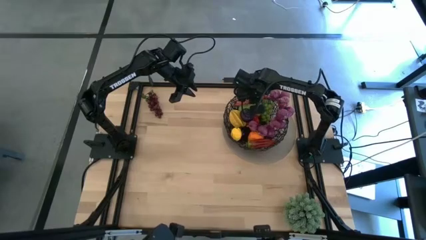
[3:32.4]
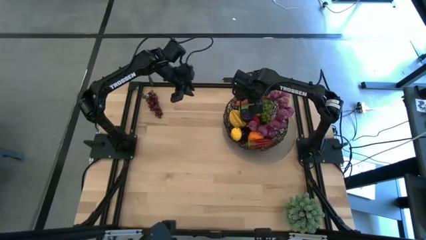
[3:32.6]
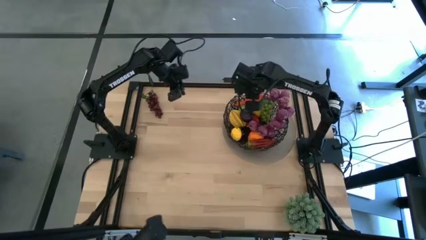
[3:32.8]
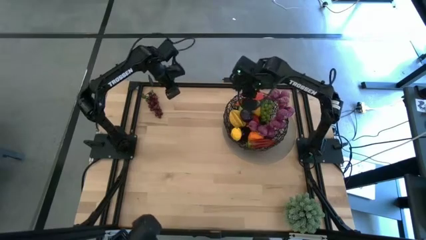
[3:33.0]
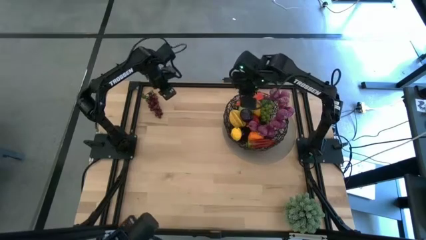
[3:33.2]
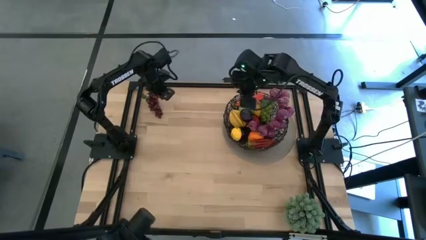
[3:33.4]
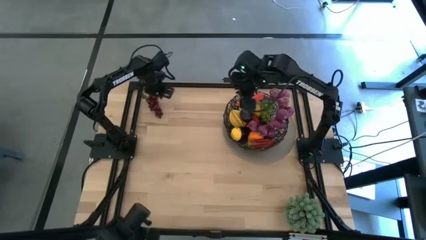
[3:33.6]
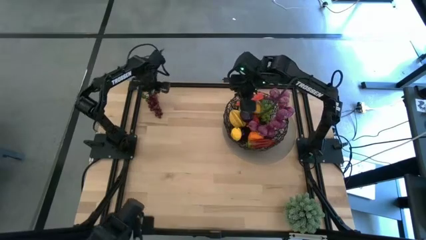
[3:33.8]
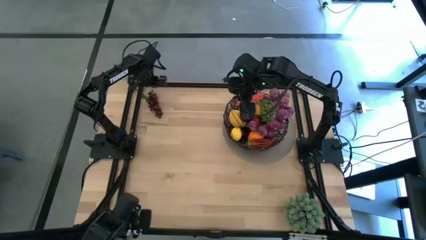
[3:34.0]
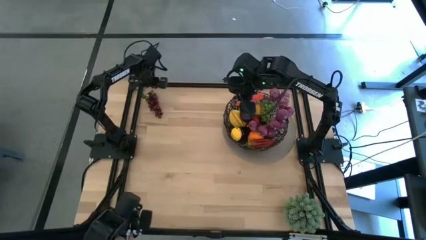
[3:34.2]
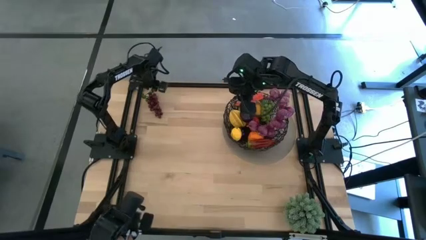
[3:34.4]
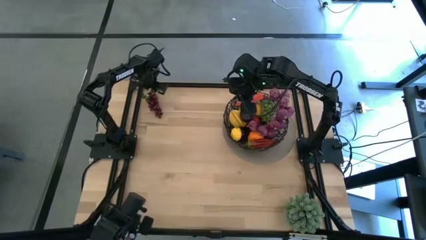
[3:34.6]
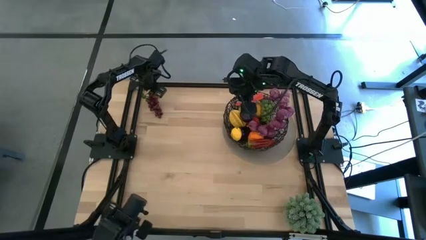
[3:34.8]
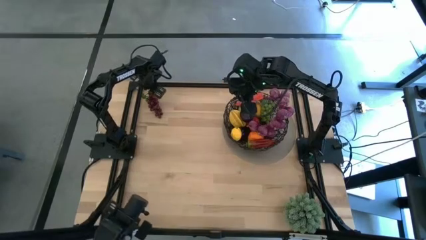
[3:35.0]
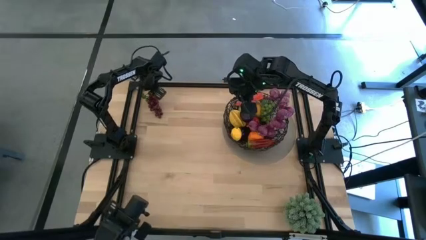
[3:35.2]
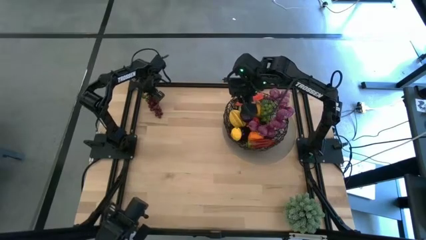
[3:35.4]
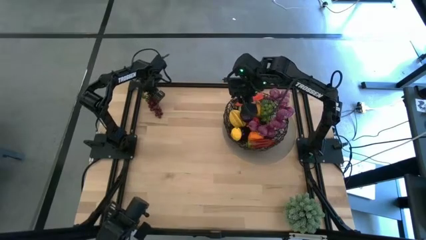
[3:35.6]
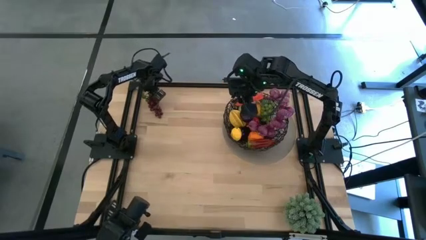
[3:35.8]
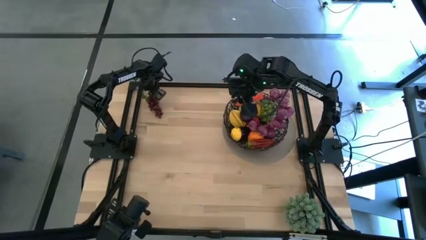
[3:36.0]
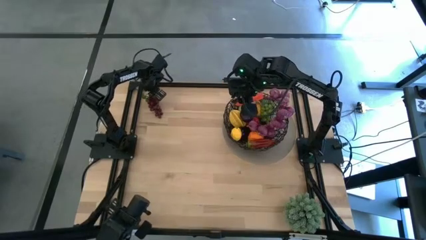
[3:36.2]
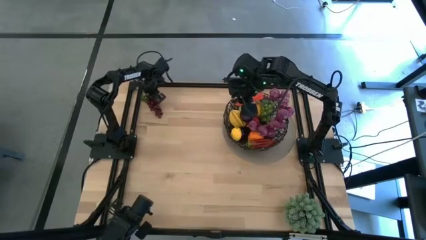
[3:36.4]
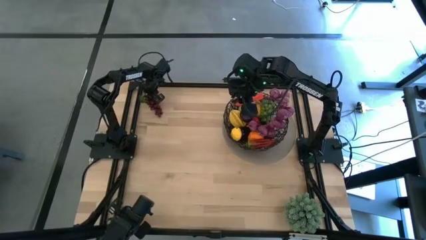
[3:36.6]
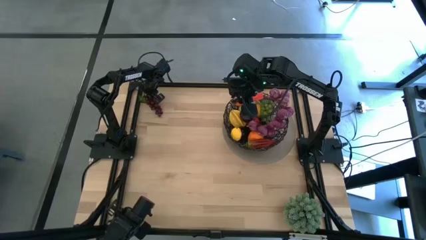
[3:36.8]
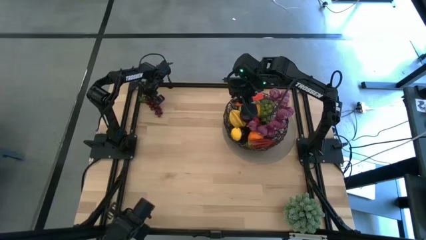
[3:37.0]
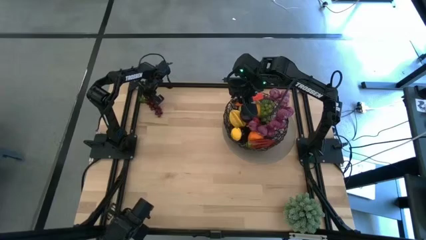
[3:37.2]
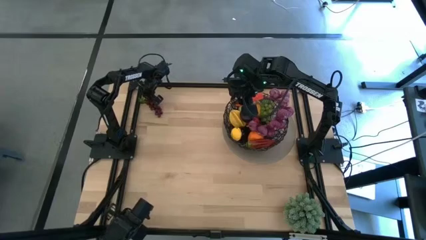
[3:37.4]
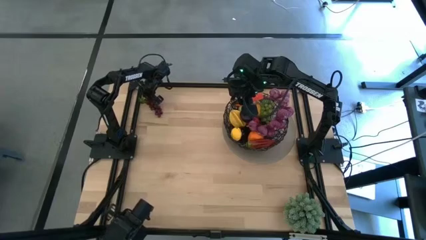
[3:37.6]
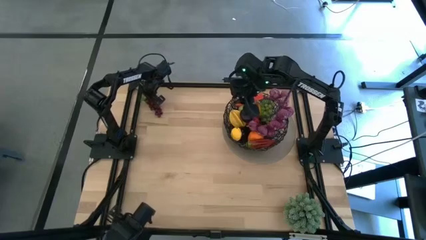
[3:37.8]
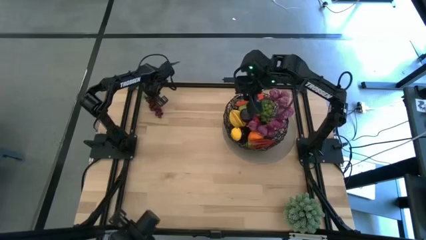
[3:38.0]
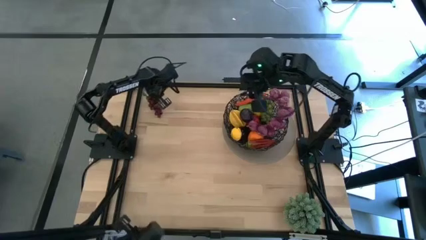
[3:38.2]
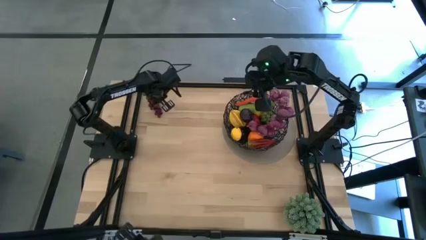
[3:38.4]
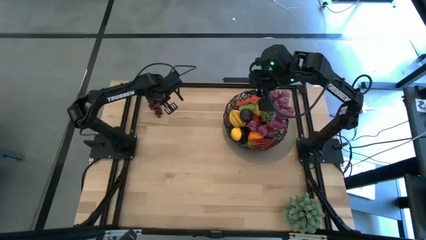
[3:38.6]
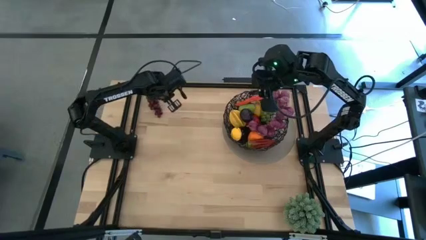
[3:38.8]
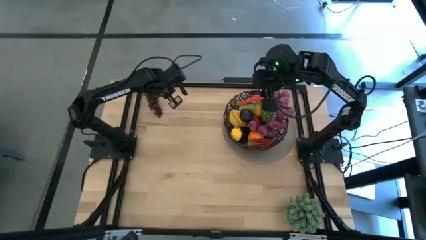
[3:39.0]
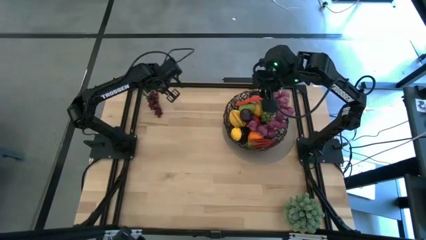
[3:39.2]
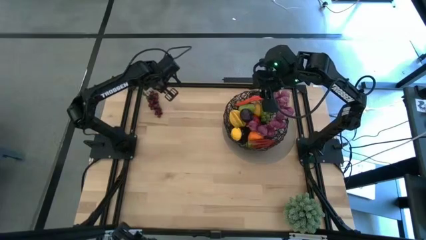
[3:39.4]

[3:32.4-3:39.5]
Task: Build produce basket
Put the purple grapes into the black wire basket

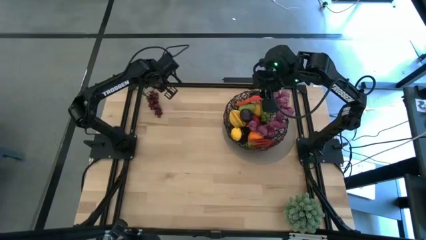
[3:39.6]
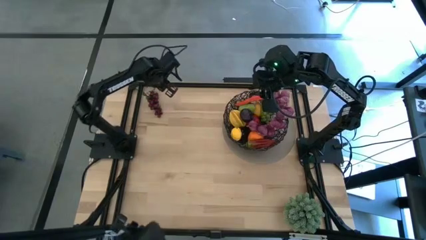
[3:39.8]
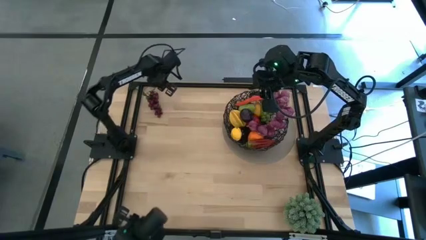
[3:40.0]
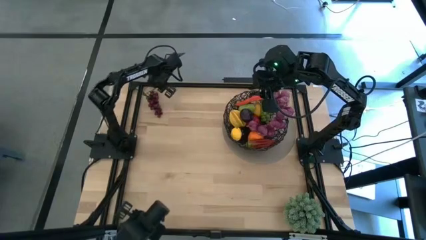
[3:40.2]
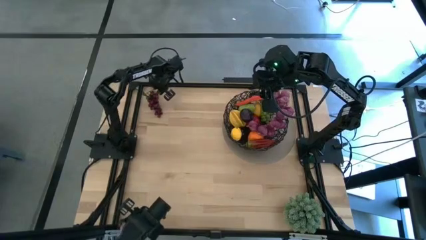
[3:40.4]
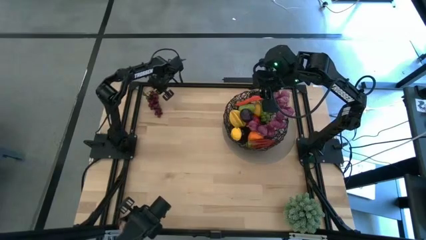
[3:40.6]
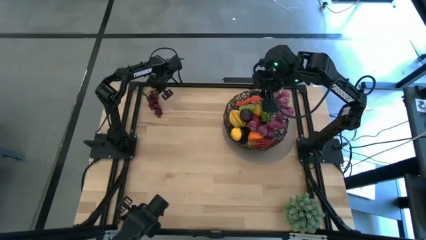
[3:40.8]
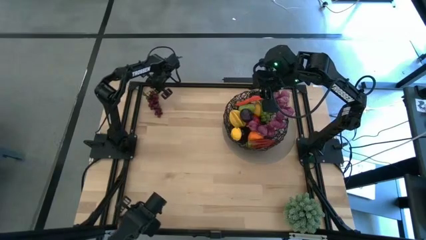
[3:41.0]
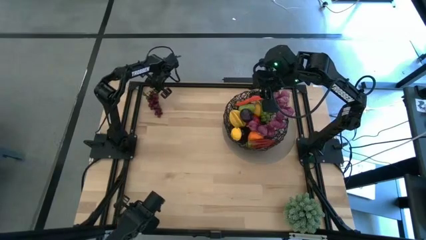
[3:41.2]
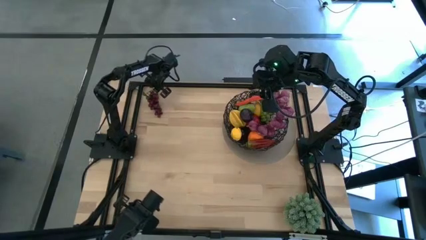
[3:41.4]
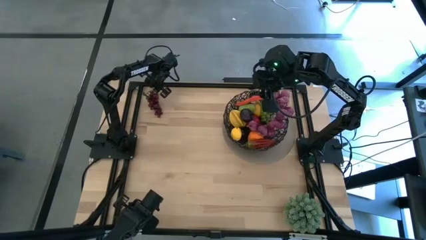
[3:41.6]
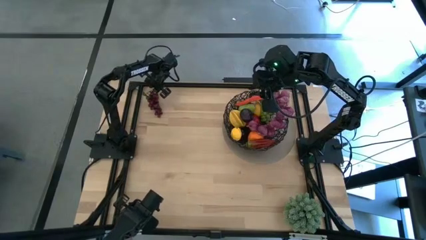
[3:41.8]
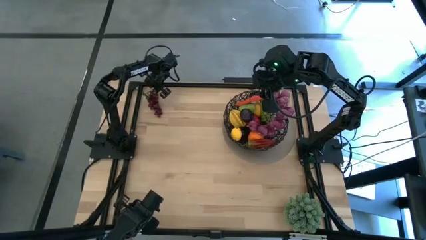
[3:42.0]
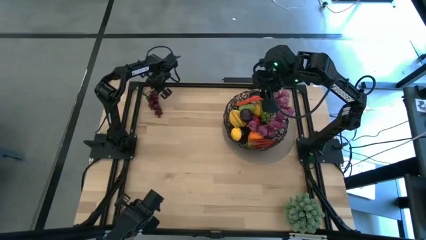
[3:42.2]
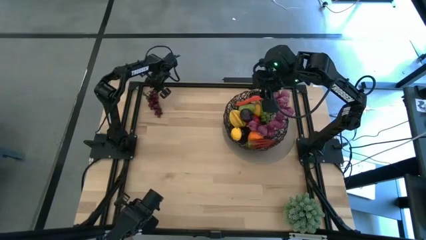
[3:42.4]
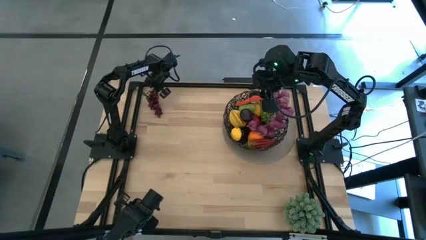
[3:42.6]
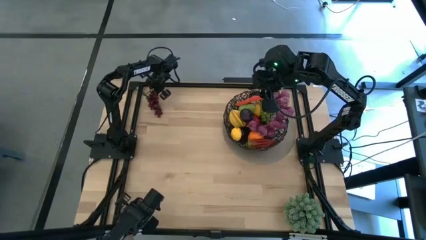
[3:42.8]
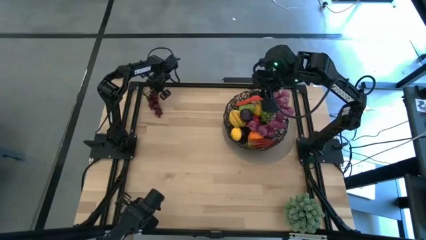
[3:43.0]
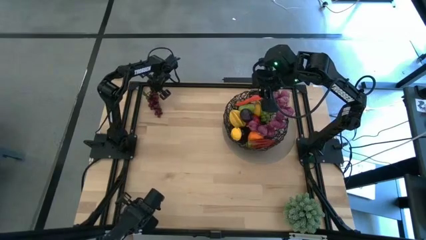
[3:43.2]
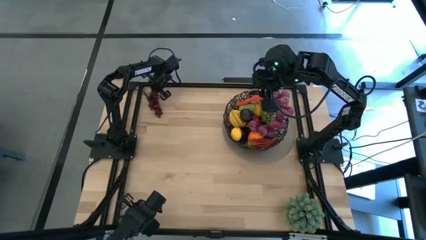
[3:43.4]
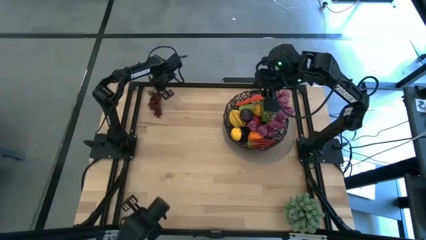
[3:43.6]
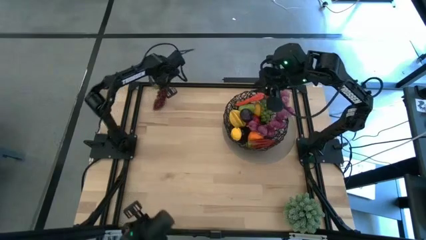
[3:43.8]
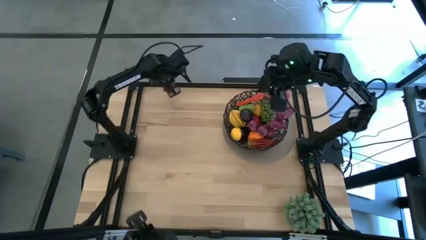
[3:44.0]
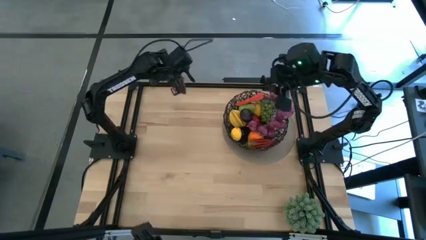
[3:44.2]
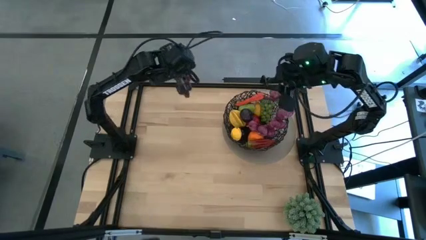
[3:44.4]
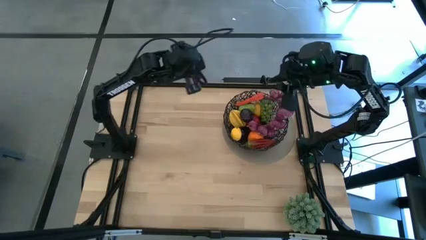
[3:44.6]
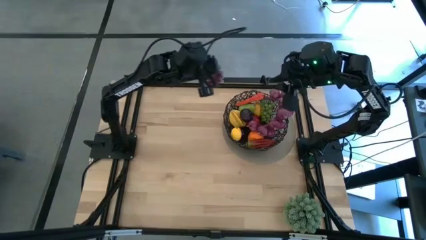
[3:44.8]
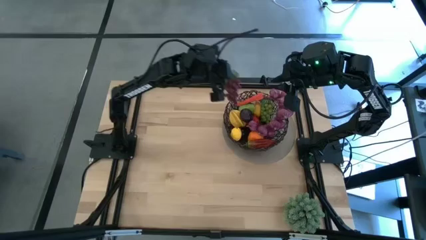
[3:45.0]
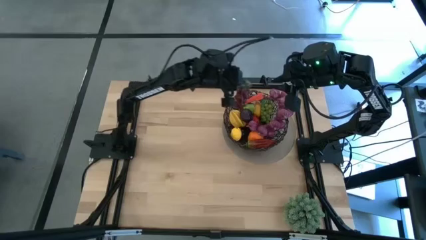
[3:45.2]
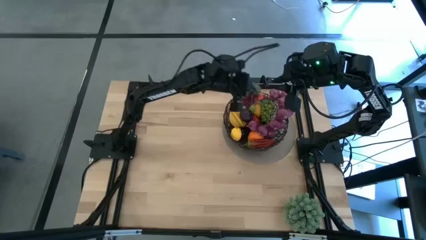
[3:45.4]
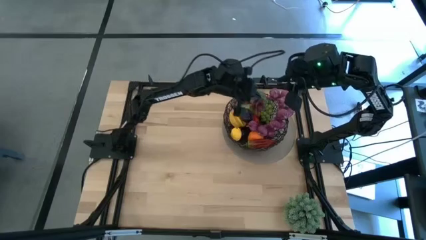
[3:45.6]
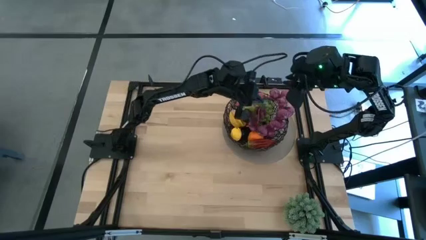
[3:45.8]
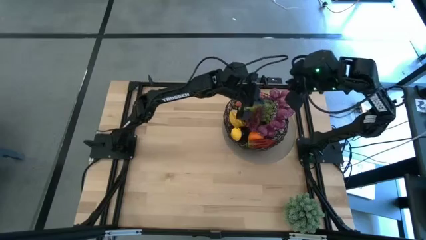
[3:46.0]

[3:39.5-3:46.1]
Put the purple grapes into the black wire basket

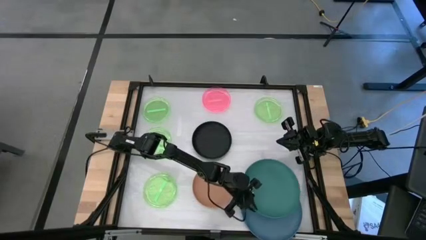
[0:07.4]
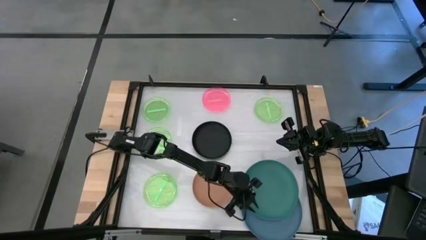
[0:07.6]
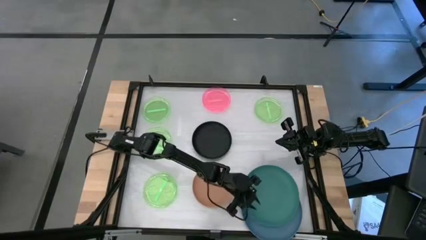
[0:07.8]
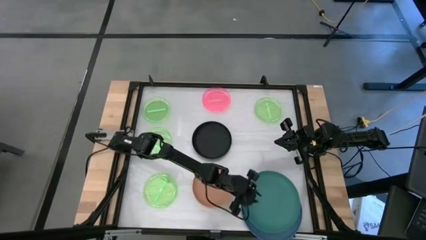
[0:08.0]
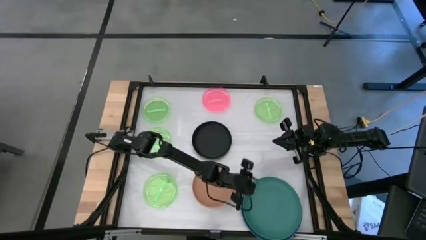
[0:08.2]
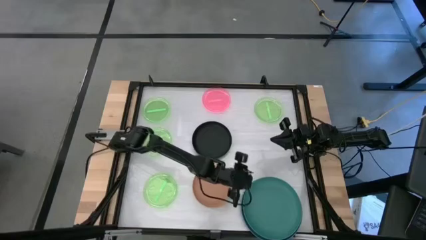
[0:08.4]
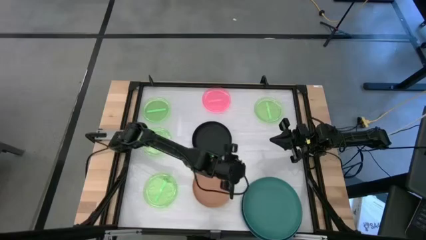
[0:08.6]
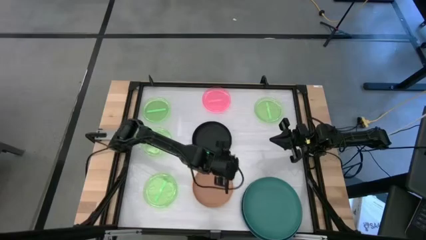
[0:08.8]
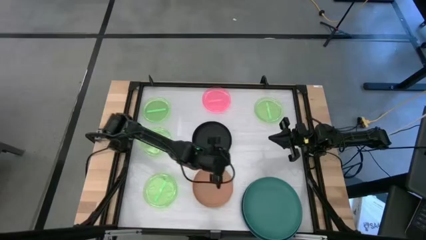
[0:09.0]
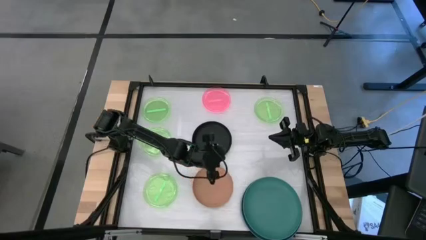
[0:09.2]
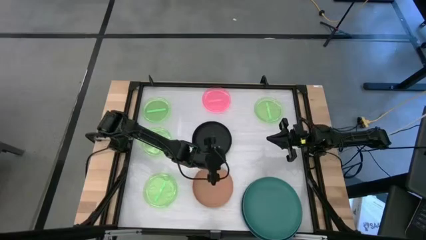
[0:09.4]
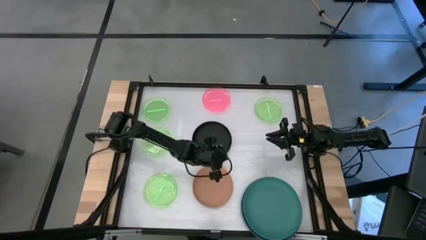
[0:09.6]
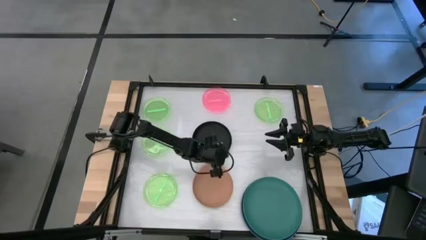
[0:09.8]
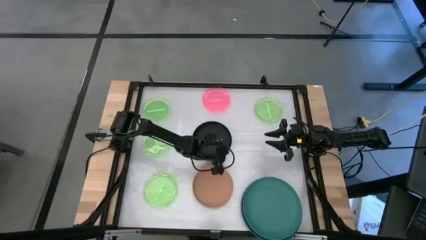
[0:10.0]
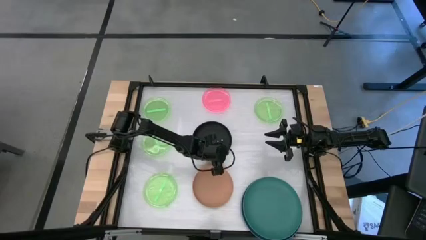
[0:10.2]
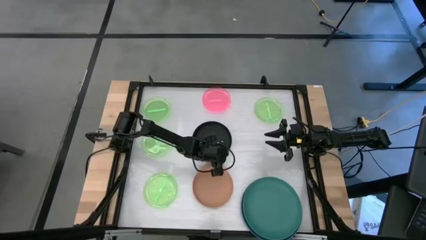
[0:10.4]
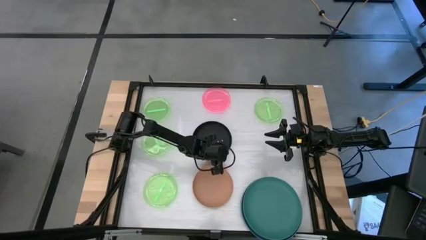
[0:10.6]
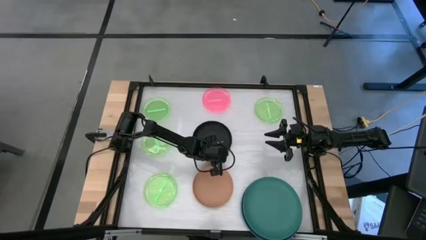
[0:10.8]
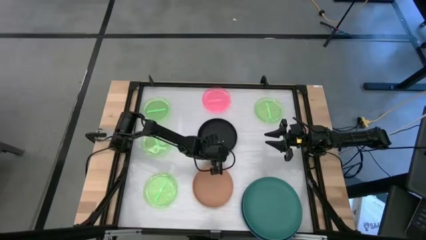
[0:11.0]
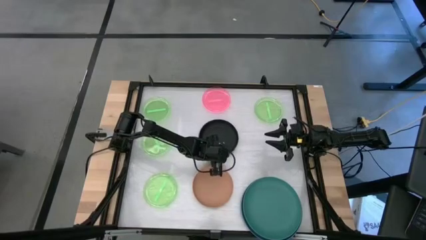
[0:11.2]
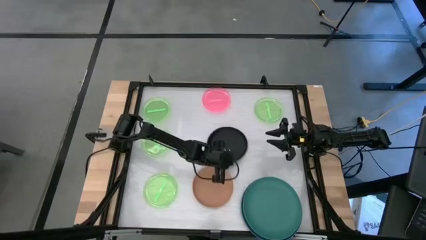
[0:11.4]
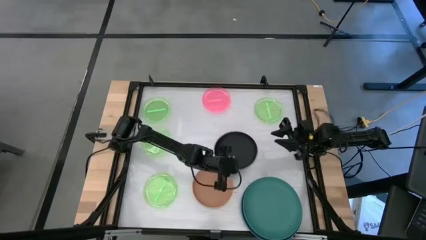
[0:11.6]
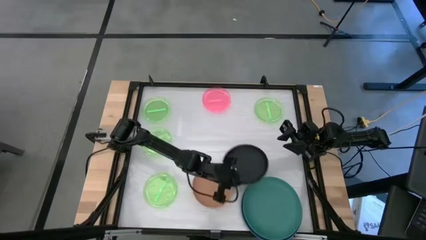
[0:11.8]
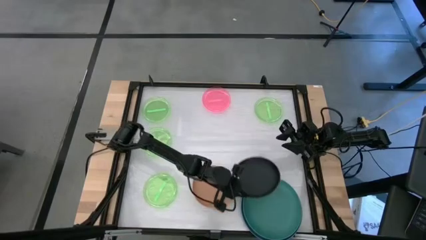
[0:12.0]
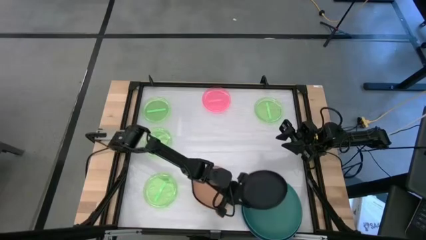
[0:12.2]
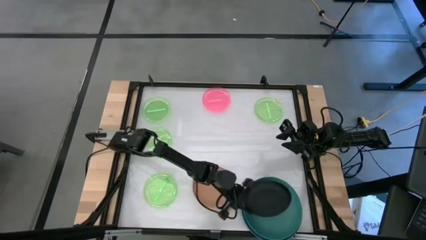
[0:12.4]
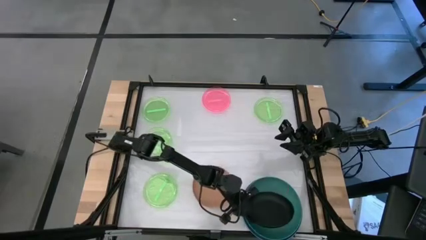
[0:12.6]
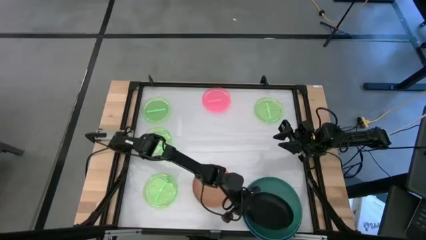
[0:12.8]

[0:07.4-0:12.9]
Task: Stack plastic plates
Stack the black plate on top of the green plate
